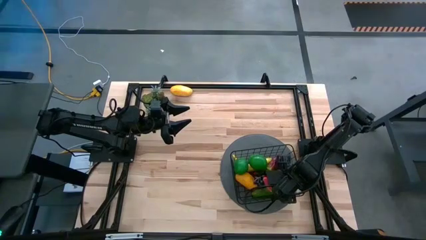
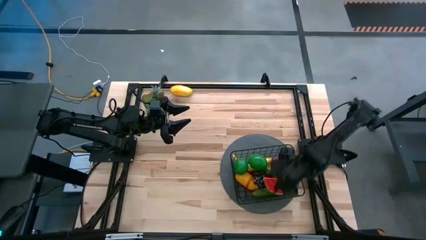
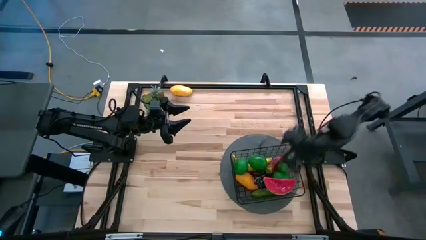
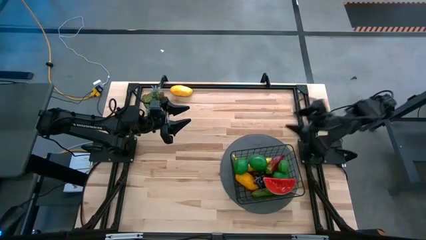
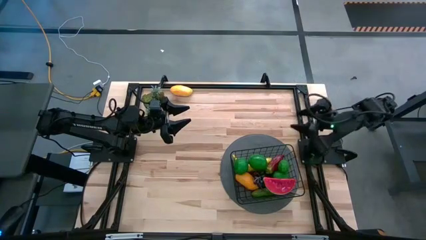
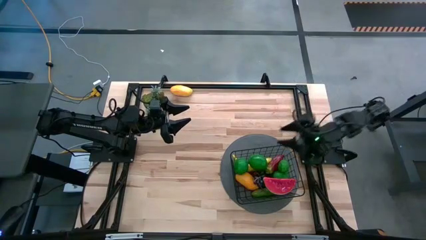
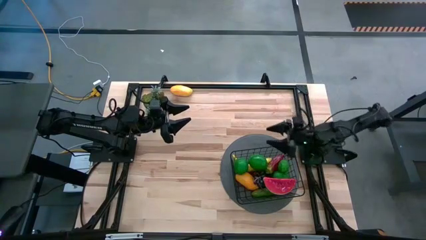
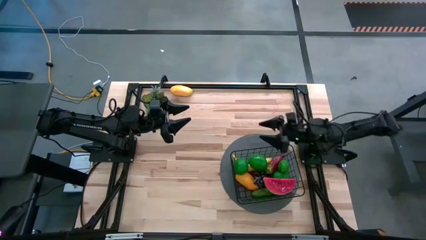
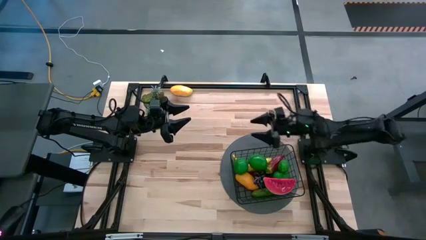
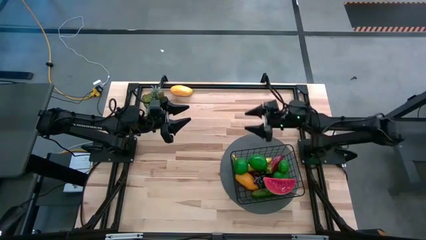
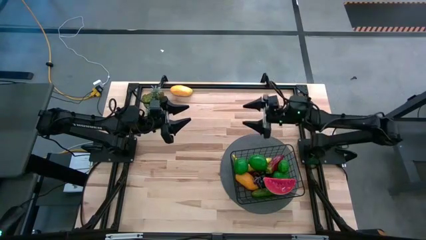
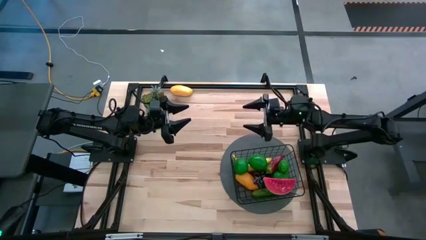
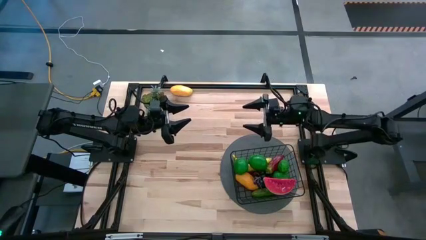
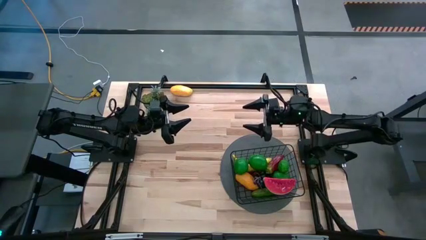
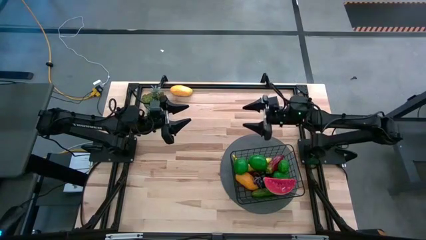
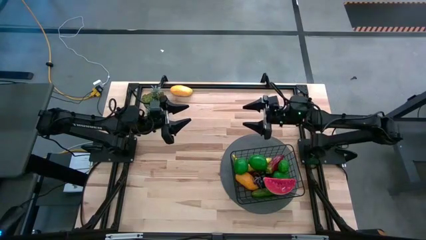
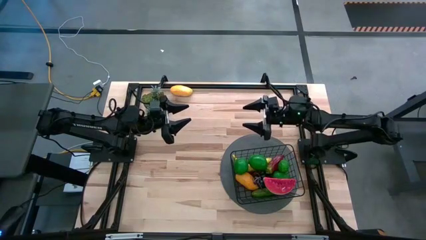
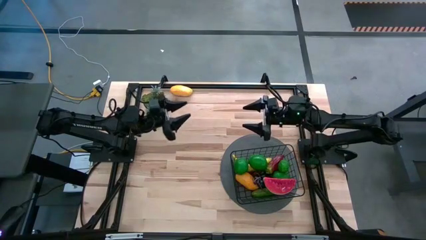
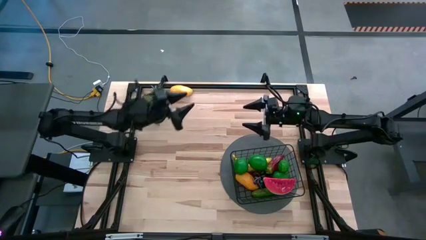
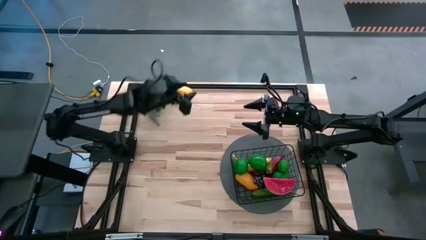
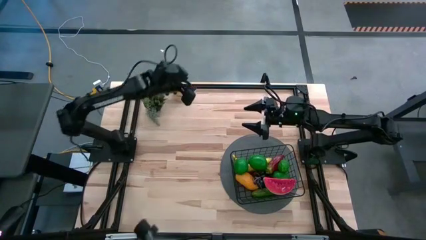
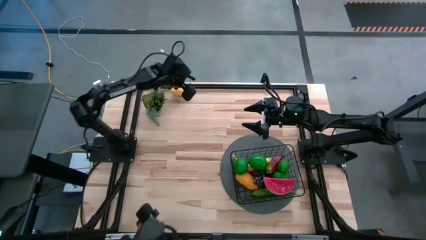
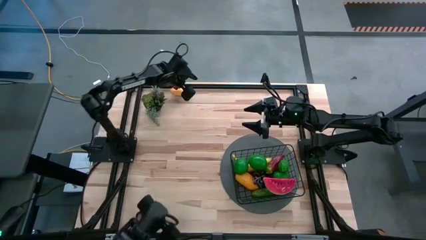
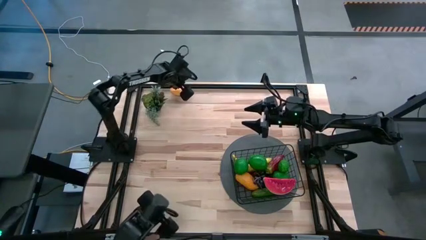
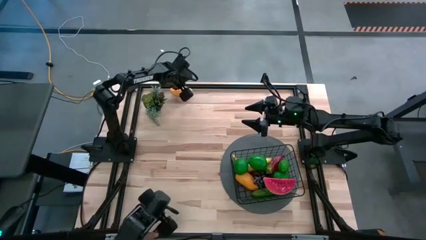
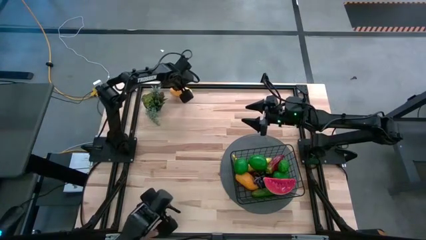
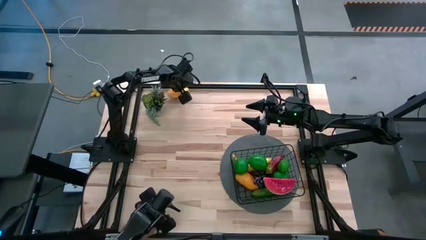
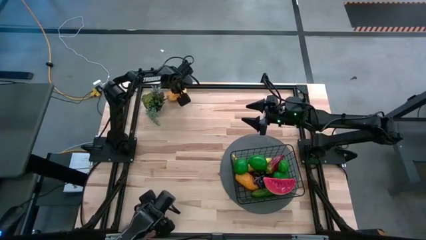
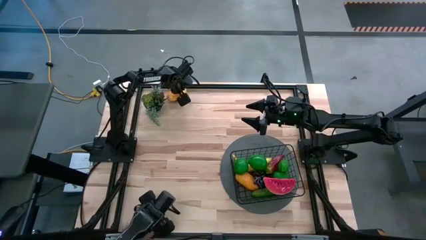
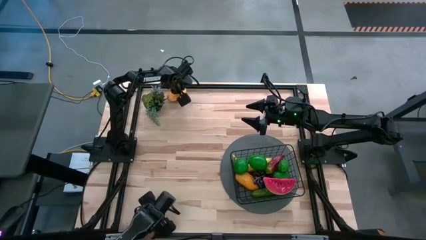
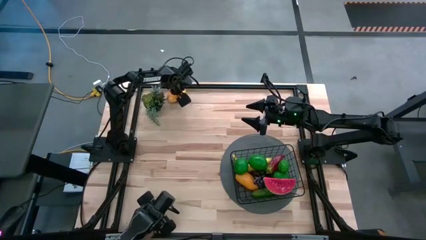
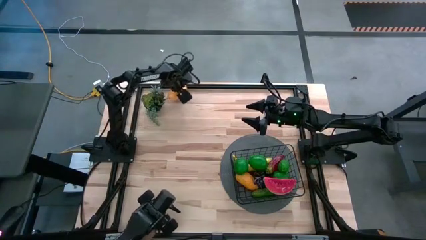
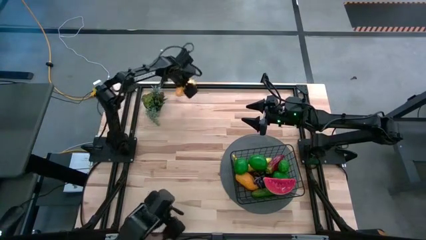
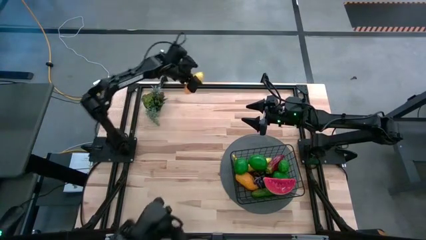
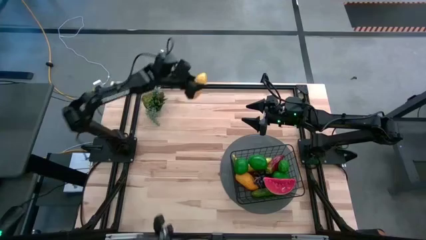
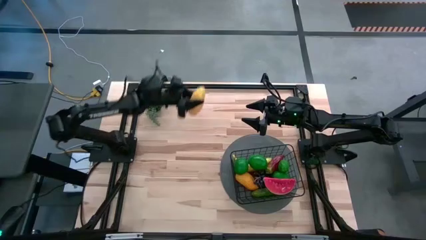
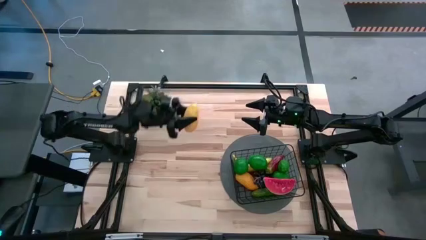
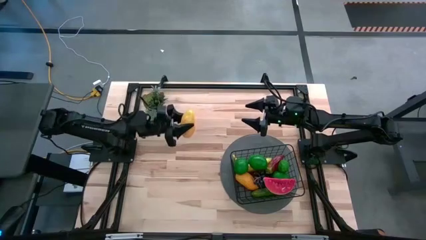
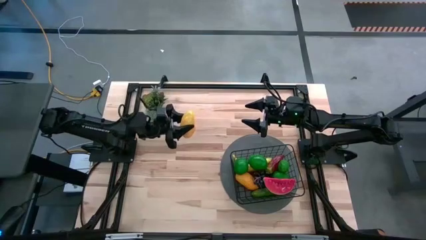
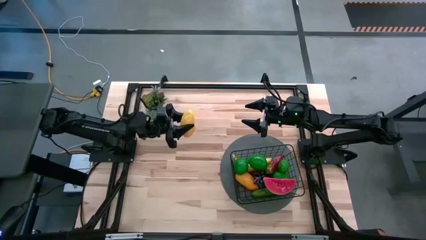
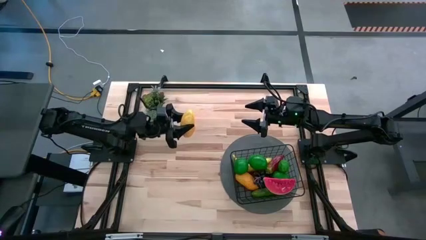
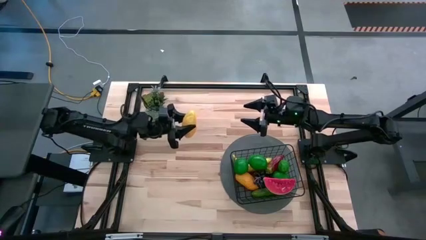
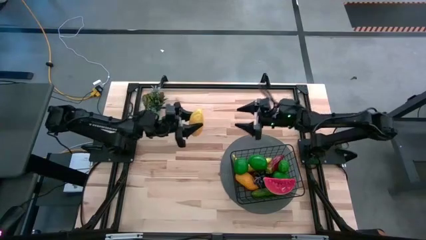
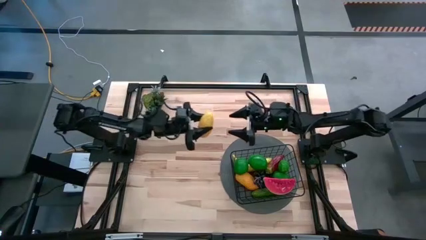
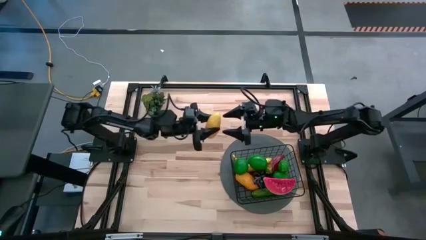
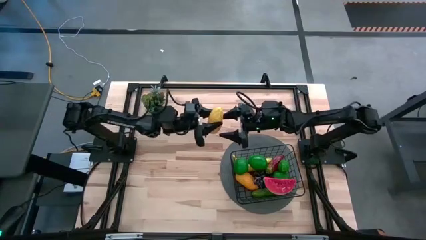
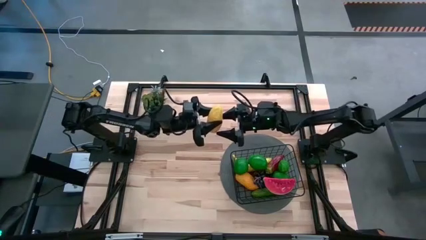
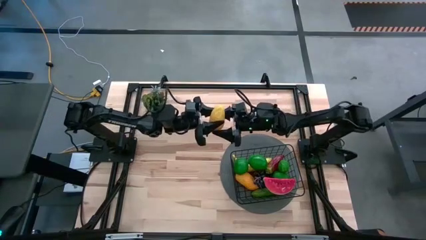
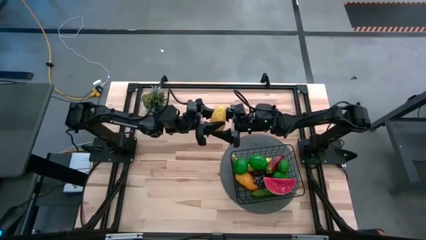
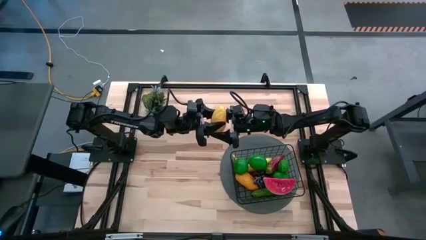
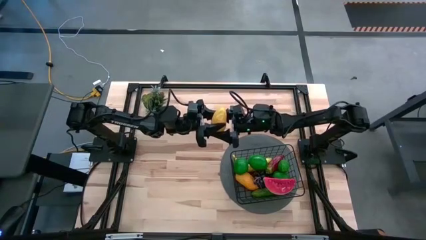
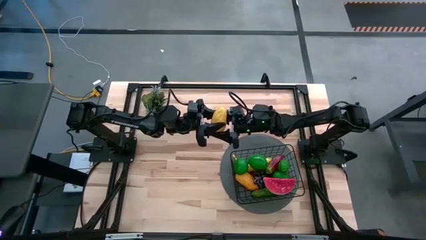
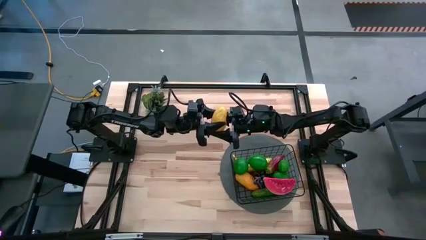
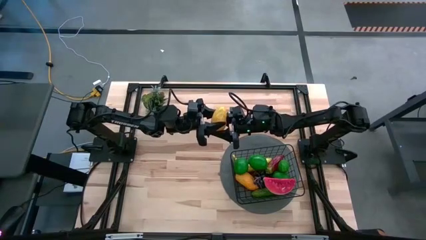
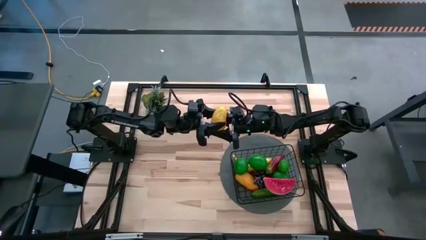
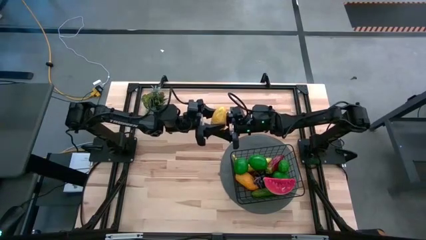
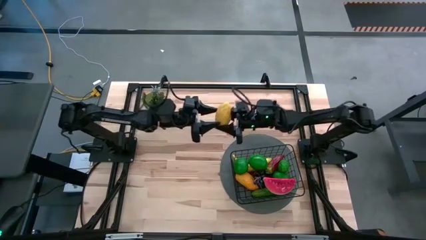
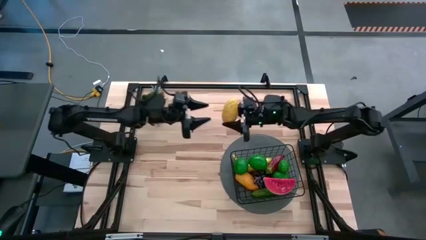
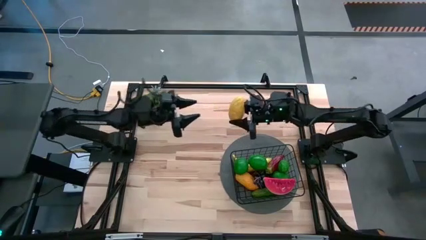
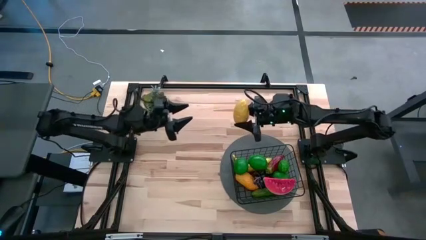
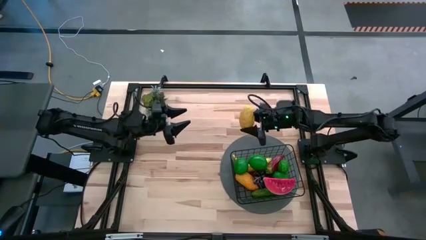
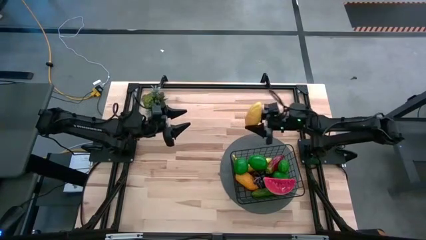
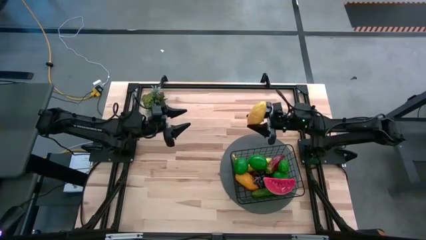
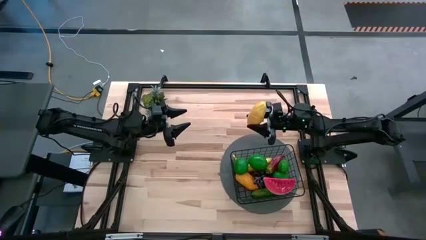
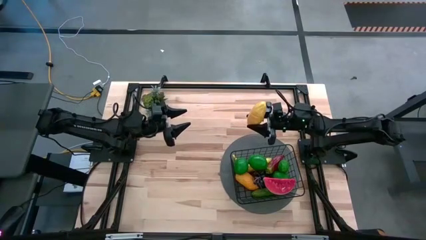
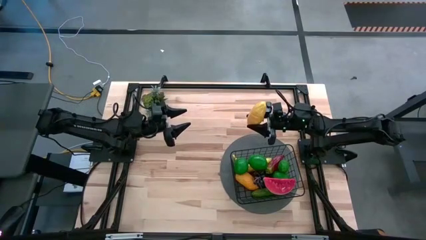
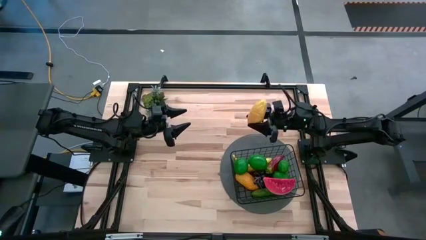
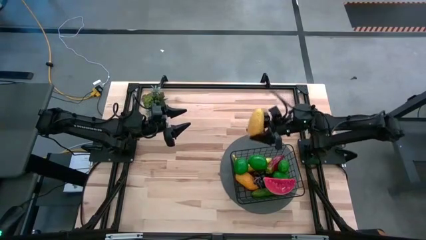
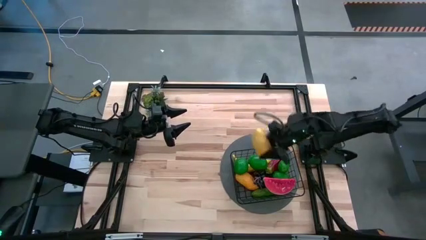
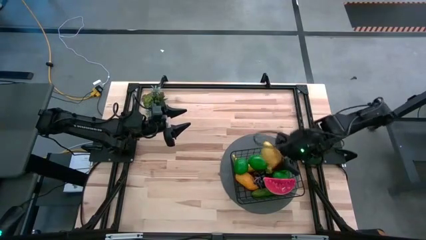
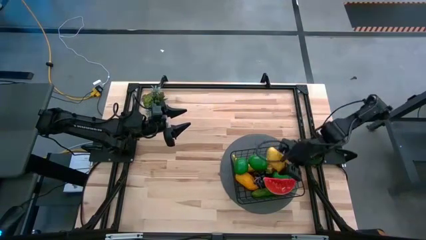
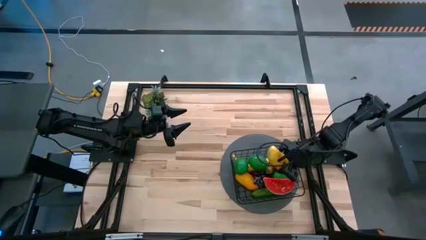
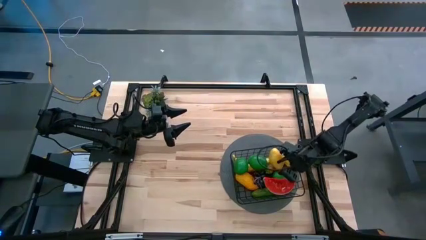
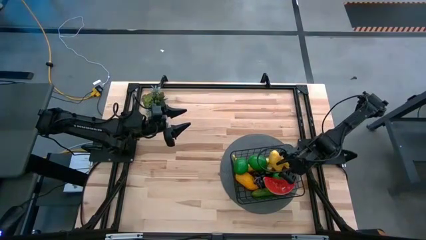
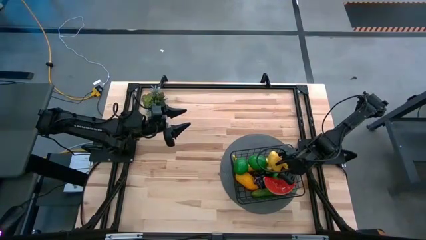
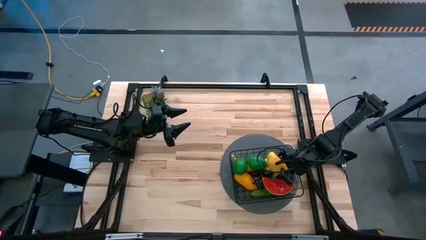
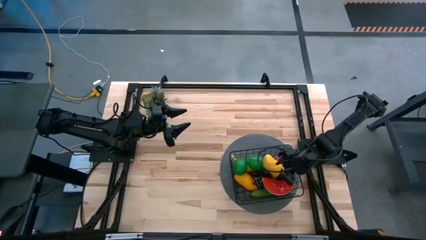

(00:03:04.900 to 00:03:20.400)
Task: Build produce basket
Put the yellow mango into the black basket

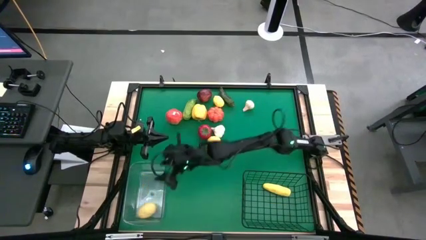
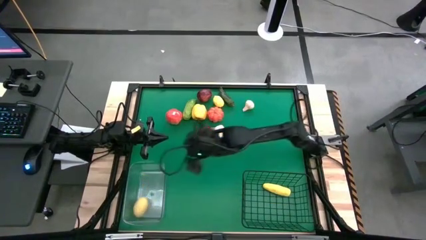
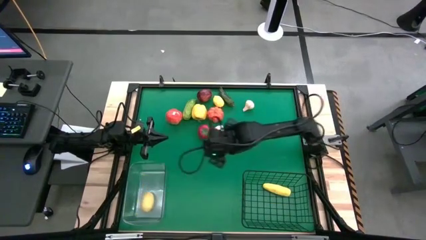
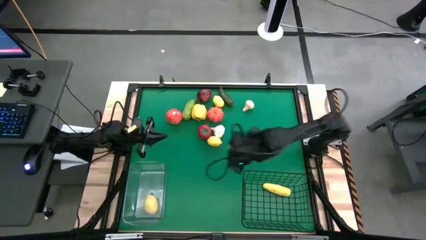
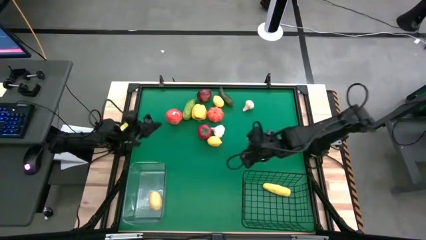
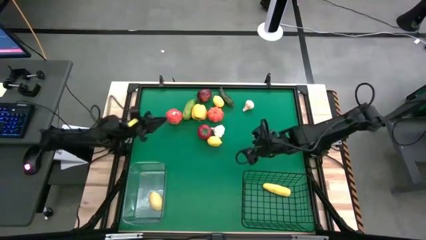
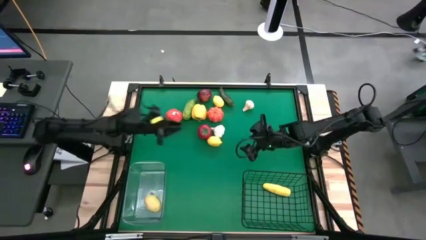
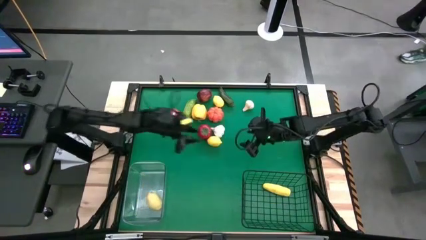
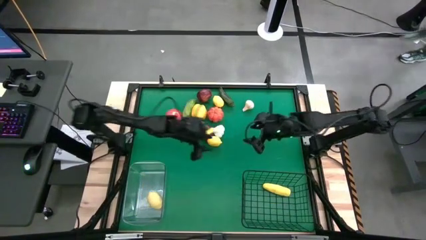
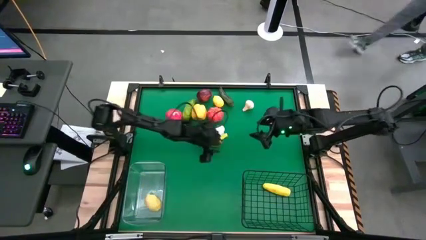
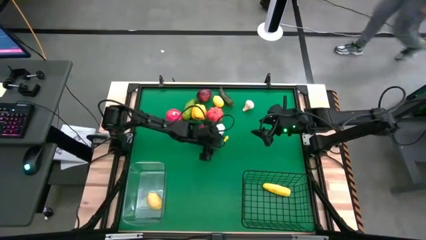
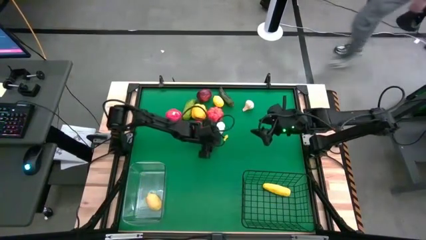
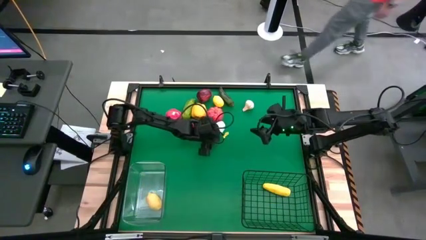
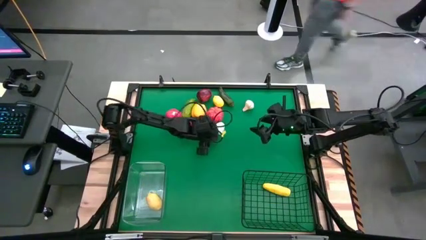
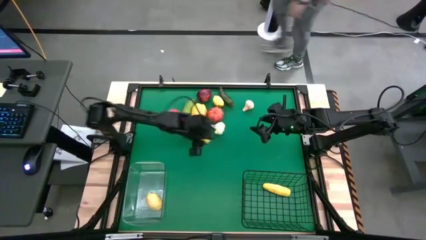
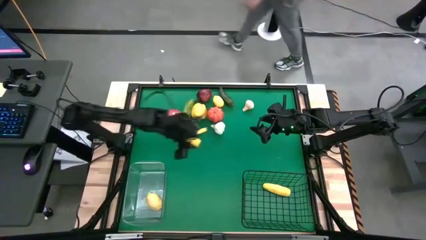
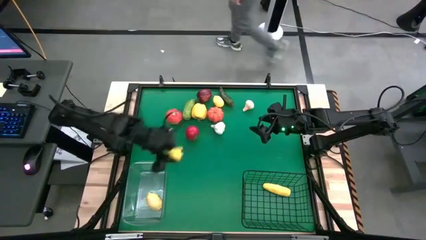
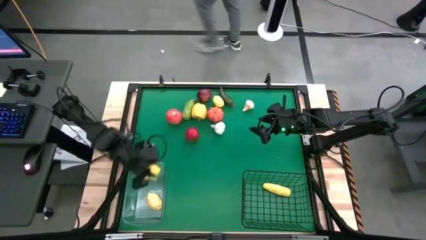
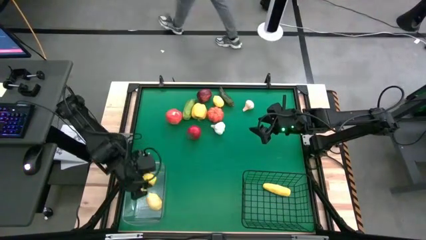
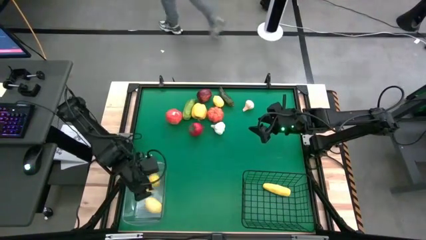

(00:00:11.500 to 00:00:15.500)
Task: Sort produce into baskets
Put the bottom lemon into the transparent bin
